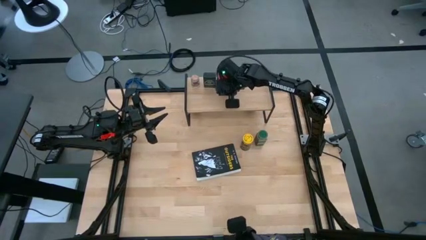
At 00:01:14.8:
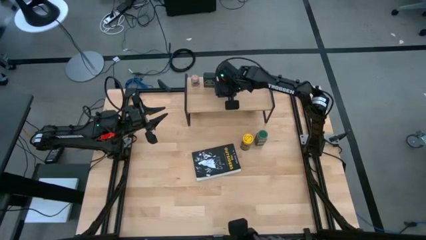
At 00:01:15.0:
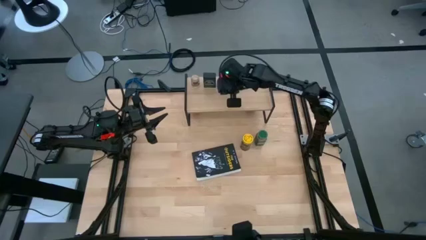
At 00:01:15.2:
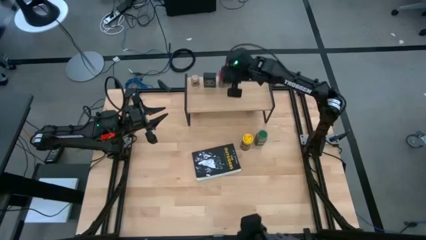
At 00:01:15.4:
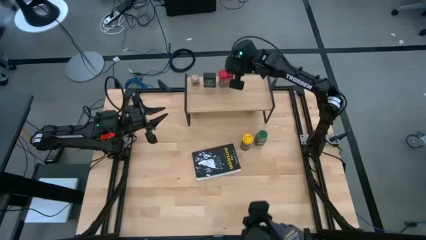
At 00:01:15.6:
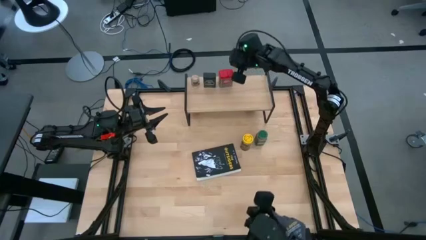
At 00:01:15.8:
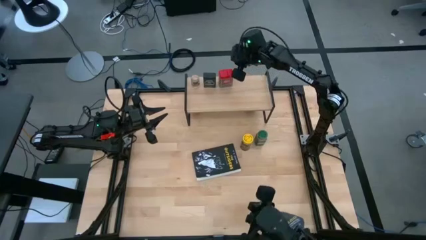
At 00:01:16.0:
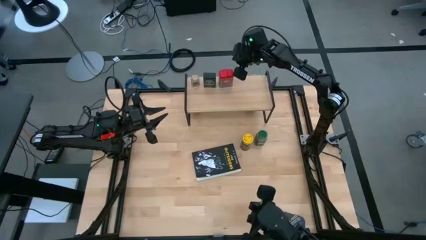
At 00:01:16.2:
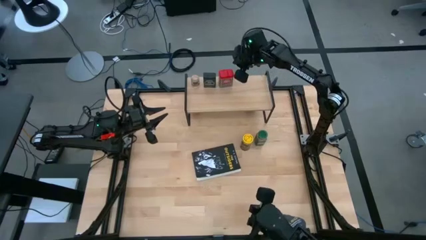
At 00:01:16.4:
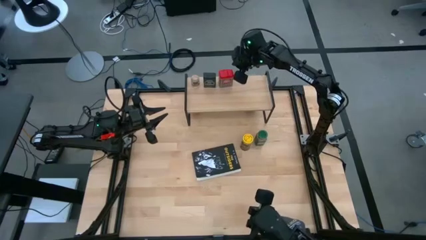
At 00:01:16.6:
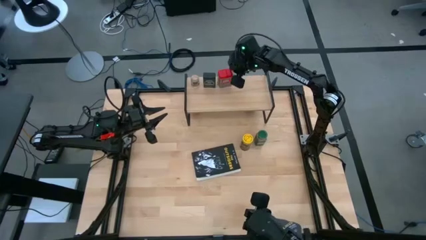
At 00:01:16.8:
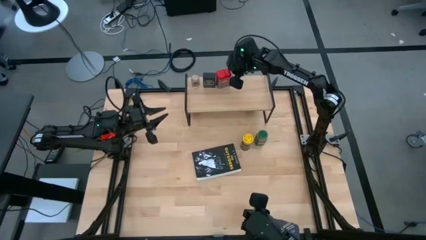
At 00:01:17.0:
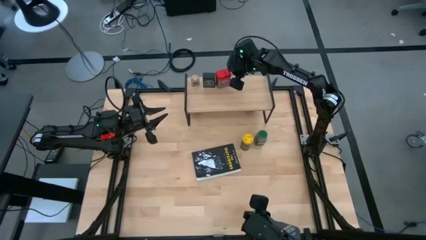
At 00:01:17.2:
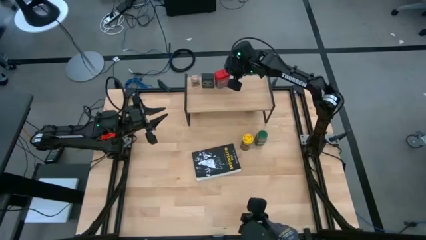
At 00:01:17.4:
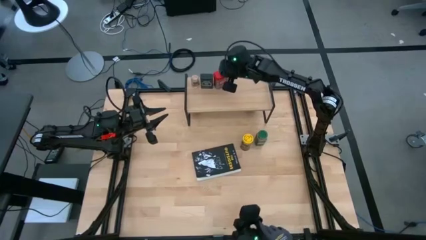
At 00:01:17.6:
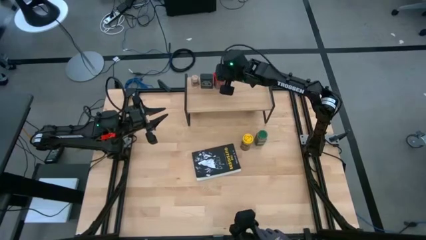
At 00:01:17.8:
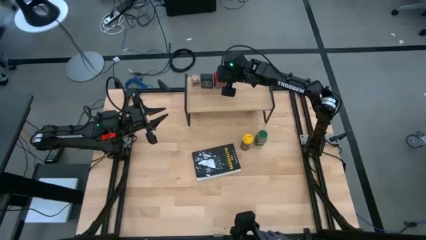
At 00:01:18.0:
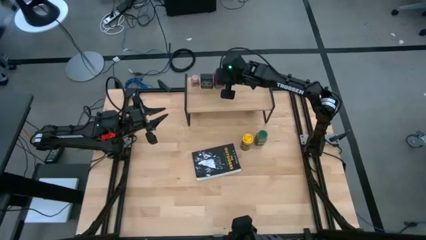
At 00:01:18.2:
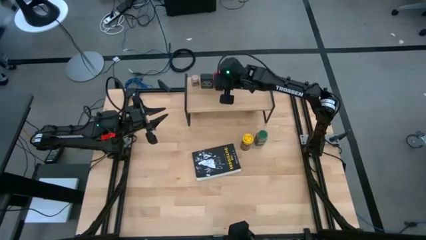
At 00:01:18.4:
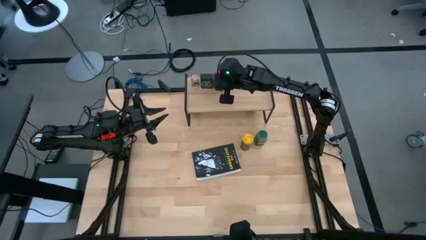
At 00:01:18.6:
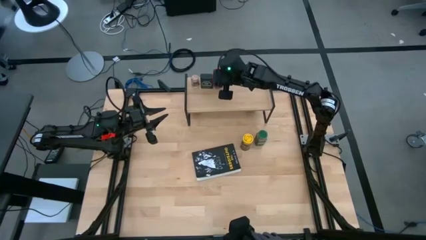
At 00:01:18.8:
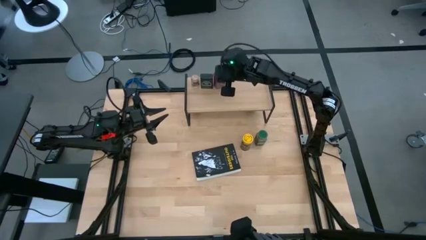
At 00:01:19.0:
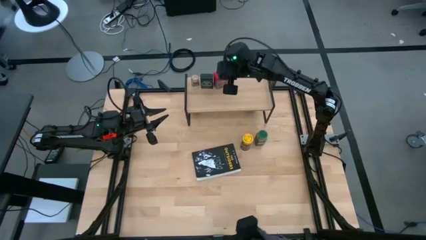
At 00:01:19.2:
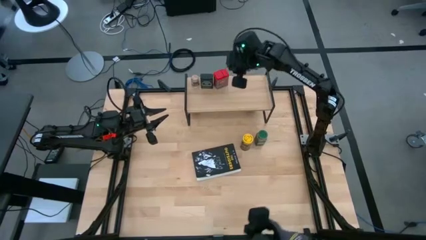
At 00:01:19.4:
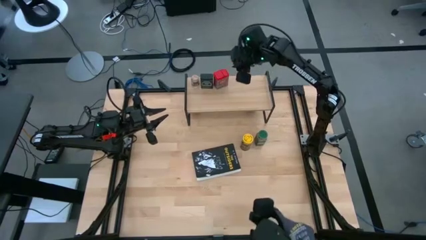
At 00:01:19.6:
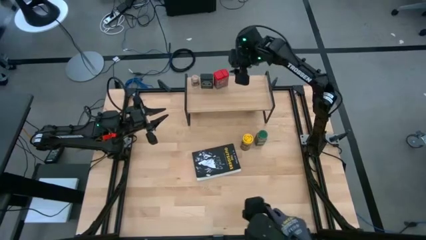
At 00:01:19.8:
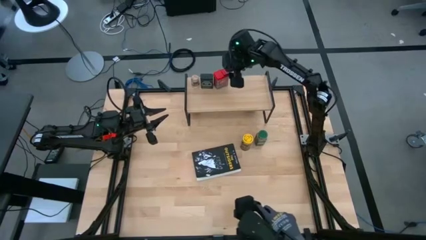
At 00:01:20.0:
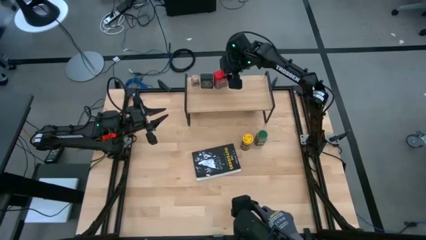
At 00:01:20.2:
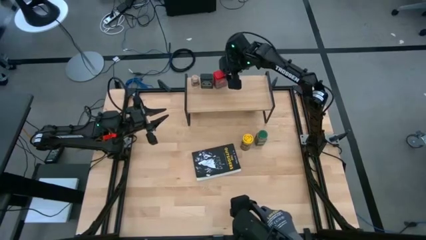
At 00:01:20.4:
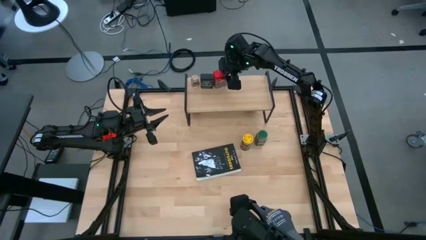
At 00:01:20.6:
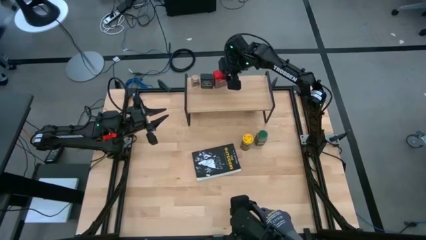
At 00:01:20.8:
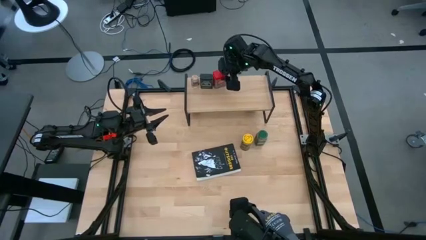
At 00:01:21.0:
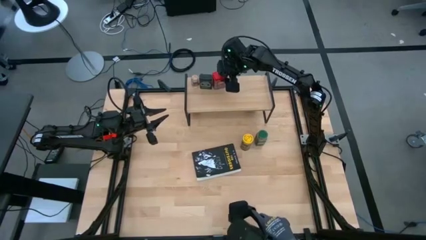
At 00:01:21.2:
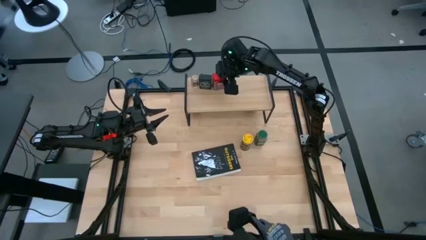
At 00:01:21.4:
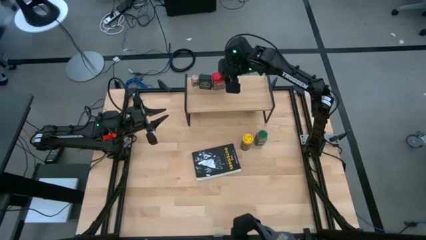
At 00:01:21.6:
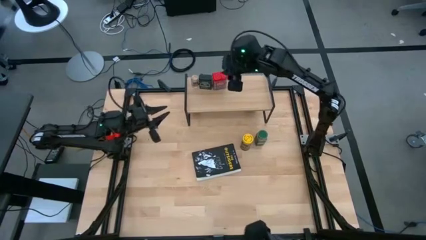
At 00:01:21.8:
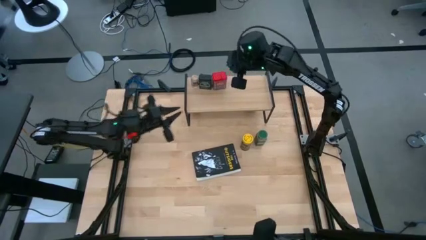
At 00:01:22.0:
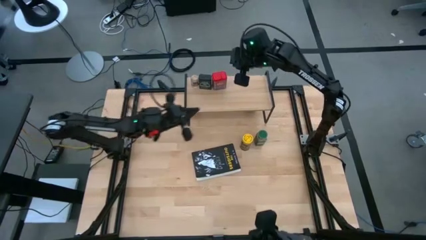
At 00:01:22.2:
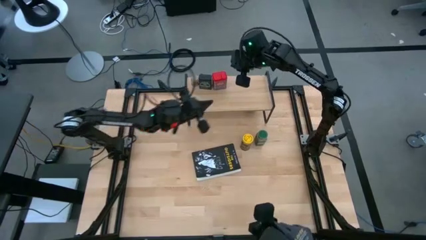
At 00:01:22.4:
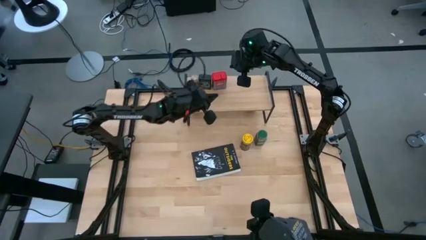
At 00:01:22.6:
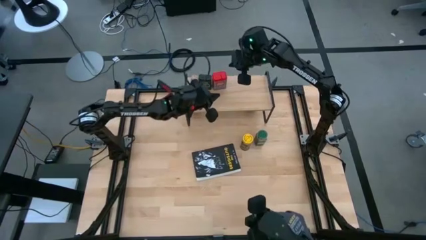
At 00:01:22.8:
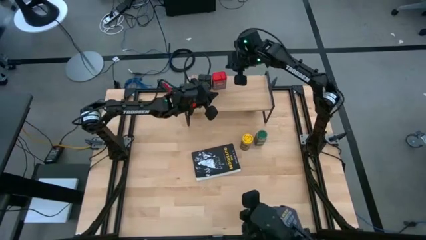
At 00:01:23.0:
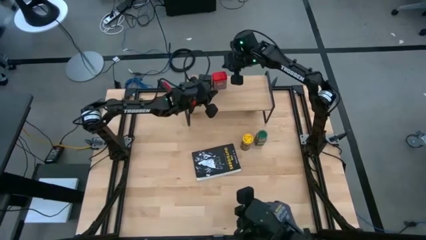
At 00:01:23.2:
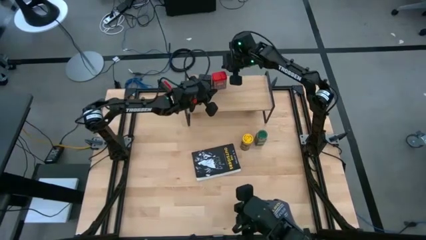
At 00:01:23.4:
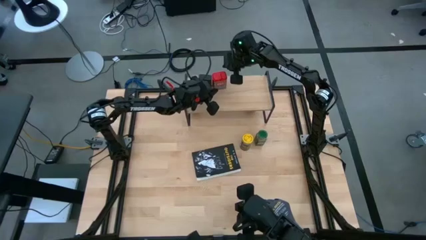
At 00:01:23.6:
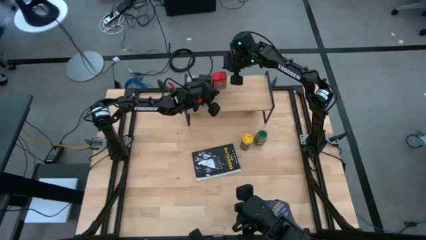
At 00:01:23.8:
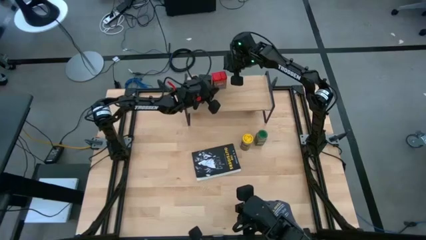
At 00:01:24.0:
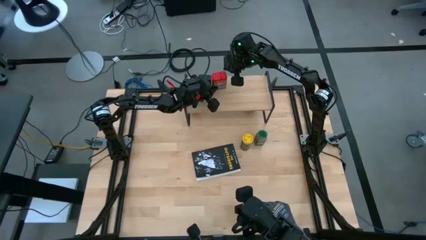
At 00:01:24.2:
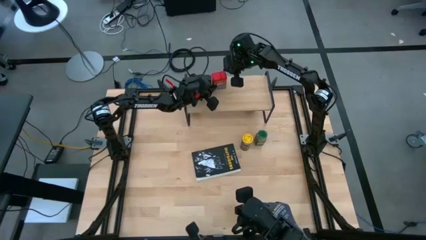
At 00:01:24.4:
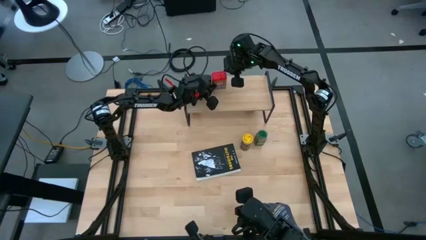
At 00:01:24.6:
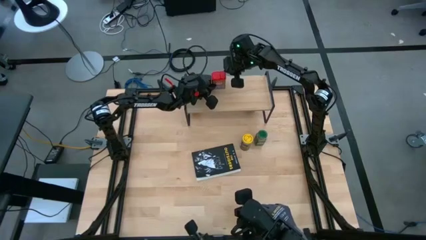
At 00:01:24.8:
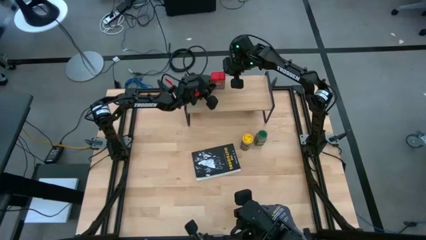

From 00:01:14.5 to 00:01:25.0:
Task: Shelf spices
Put the red seasoning on the shelf
